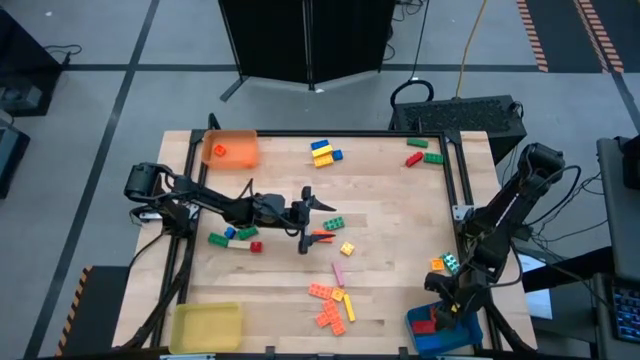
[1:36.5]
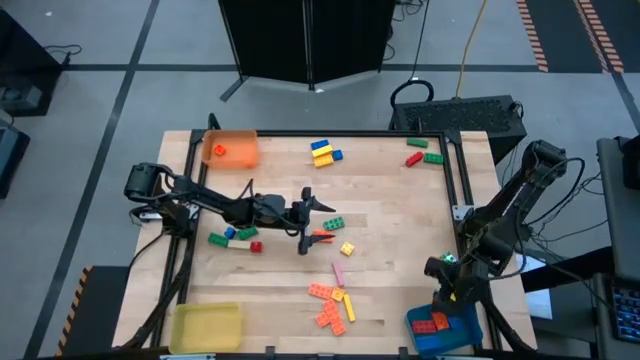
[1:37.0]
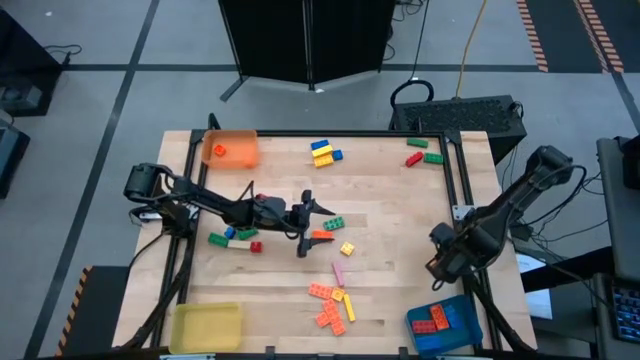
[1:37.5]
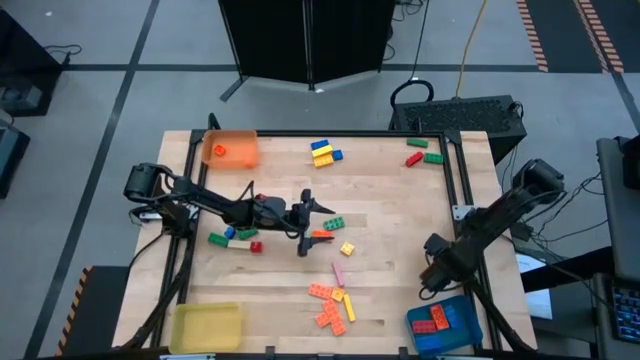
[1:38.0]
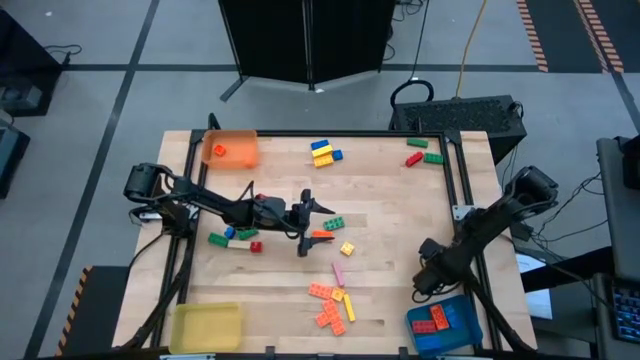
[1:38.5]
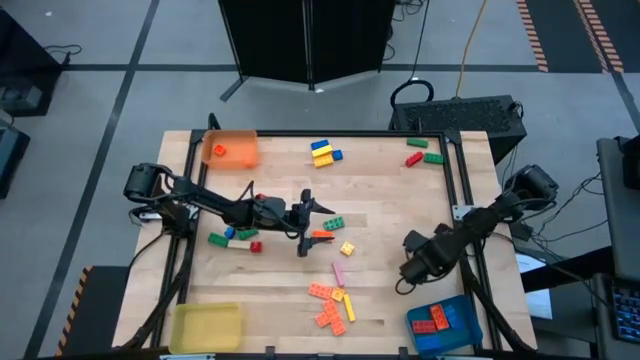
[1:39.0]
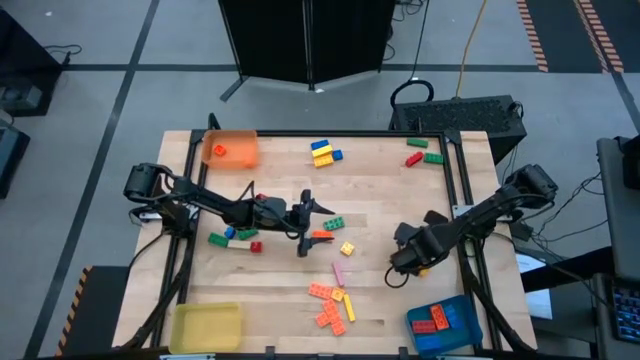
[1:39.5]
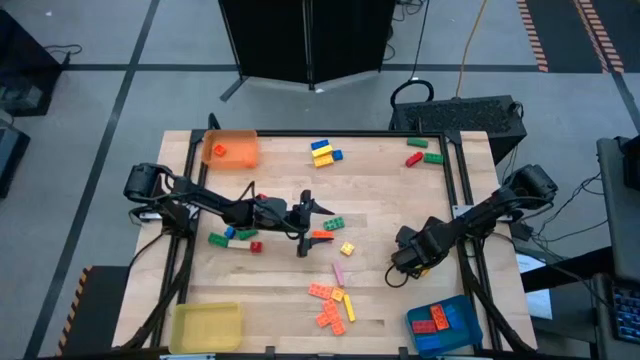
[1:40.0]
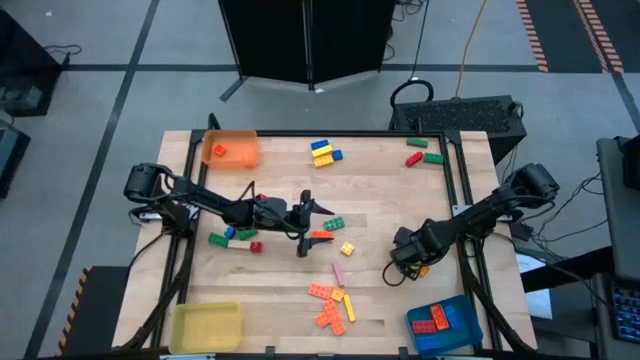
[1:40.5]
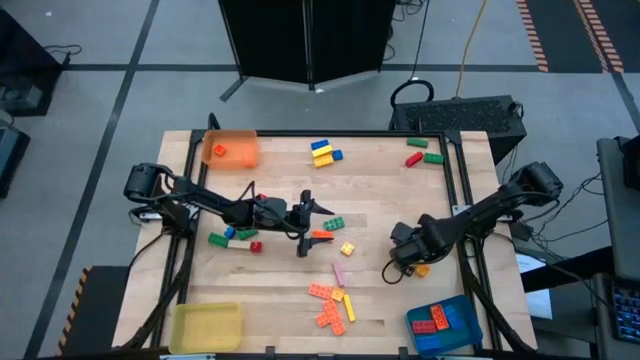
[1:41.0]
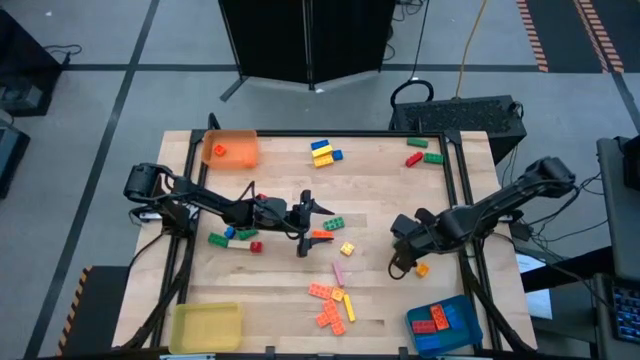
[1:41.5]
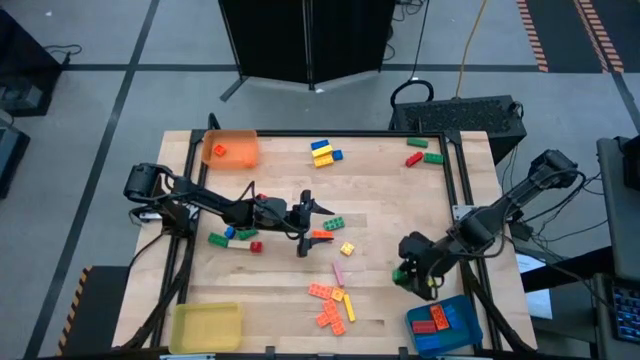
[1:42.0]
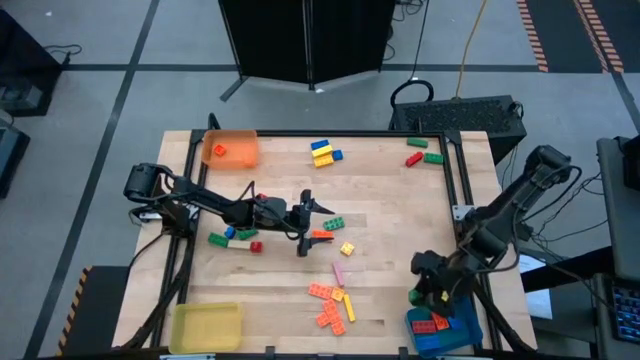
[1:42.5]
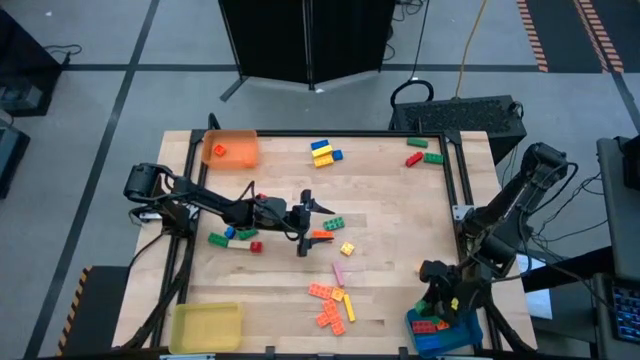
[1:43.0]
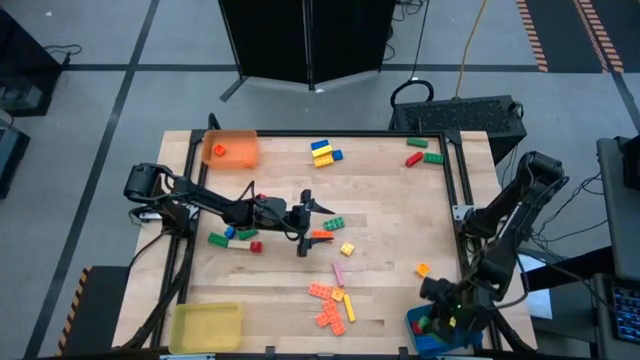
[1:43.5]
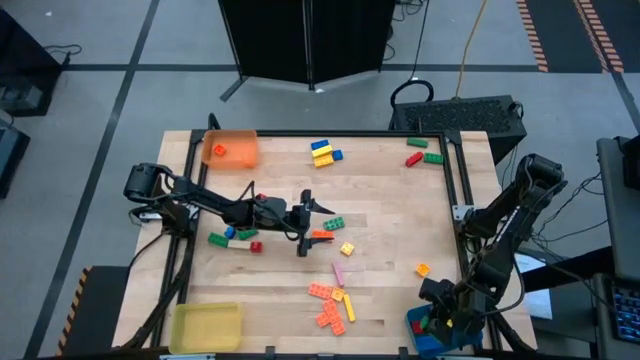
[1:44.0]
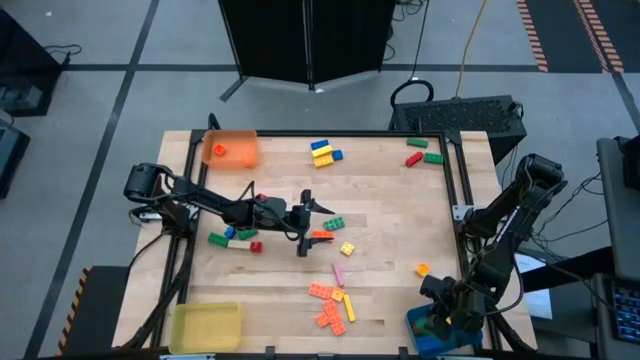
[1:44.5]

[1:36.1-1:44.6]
Task: Sort blocks by size
Put the green 8 stud game piece into the blue bin

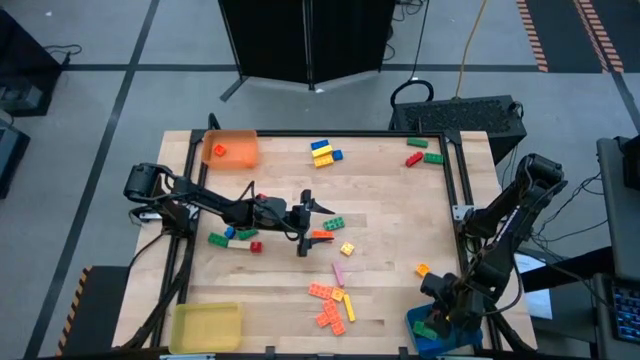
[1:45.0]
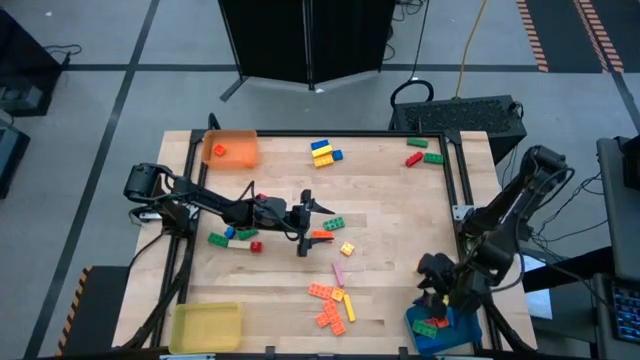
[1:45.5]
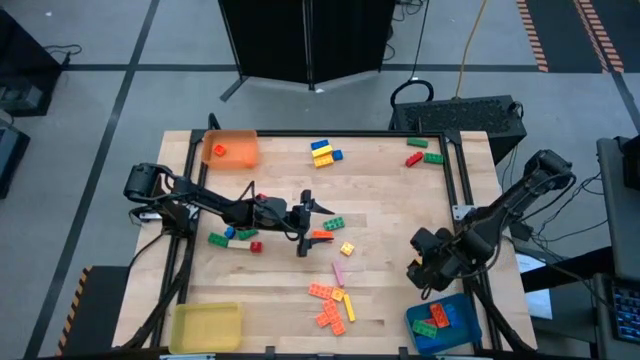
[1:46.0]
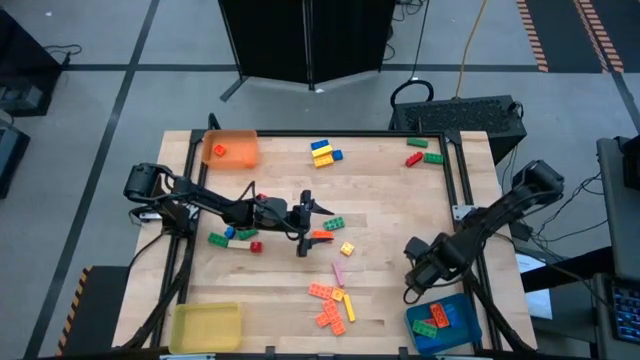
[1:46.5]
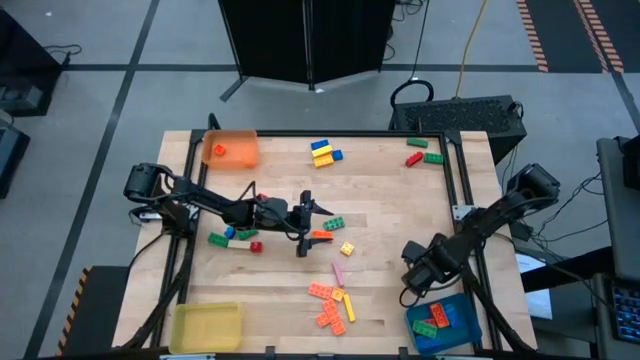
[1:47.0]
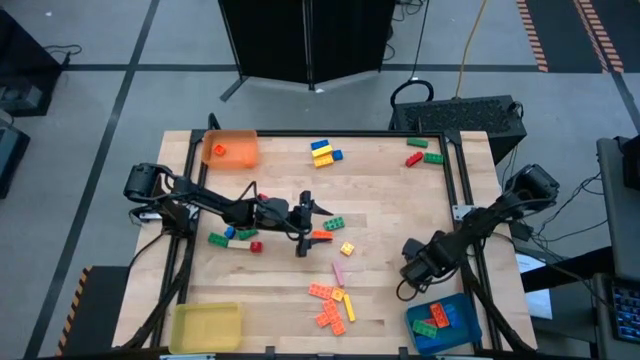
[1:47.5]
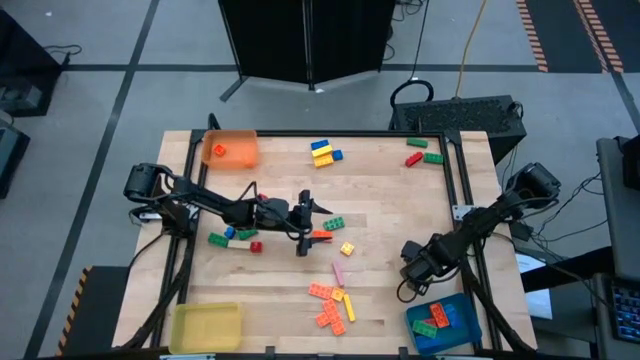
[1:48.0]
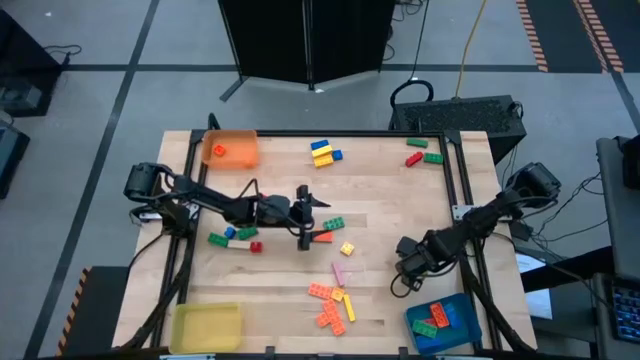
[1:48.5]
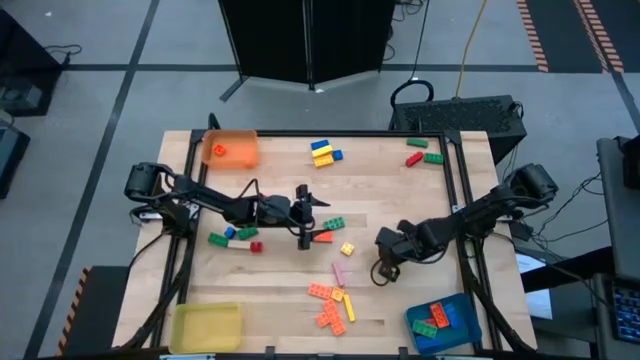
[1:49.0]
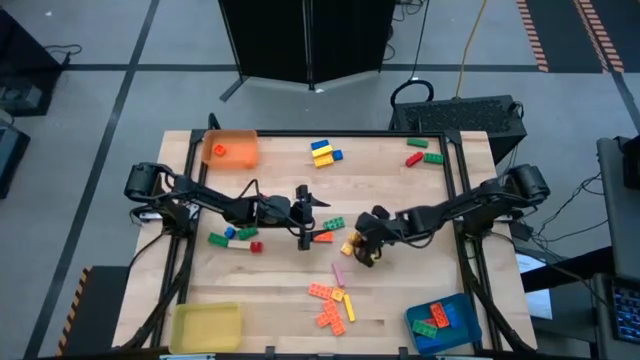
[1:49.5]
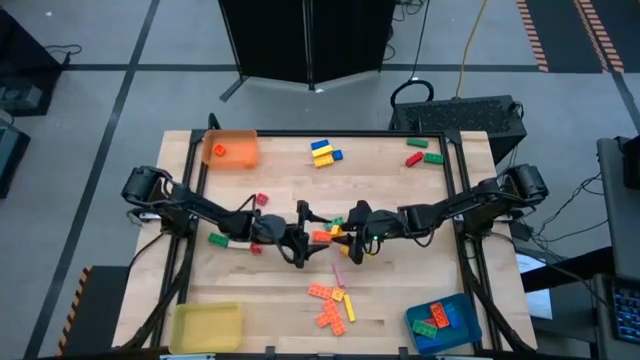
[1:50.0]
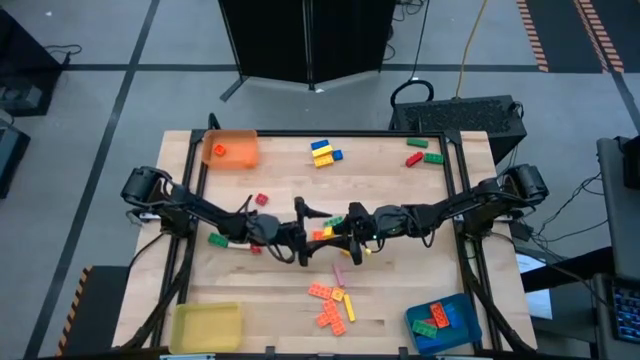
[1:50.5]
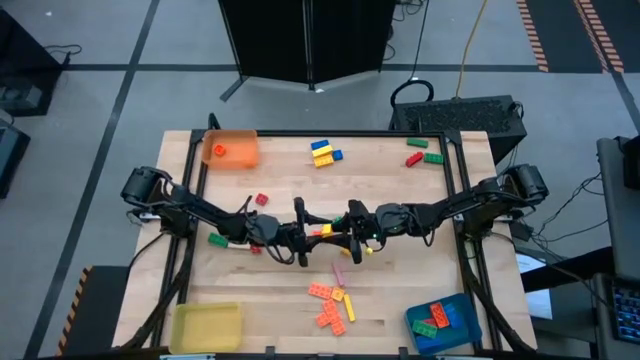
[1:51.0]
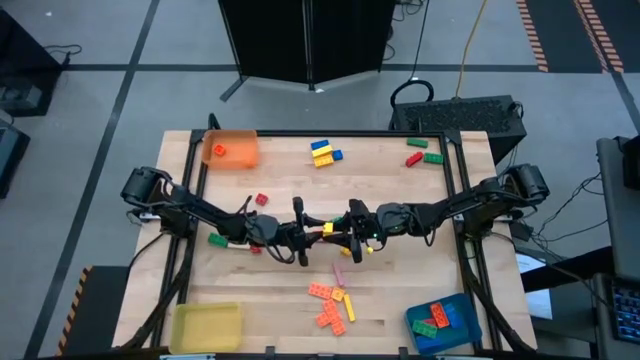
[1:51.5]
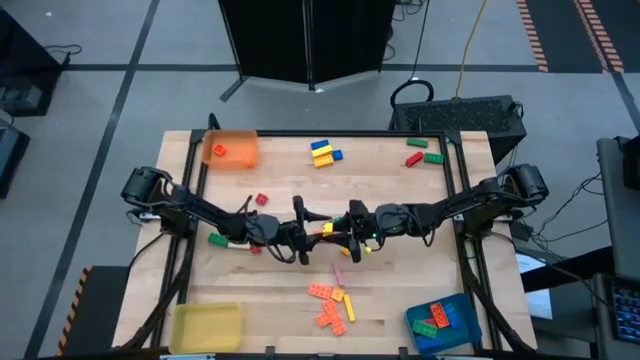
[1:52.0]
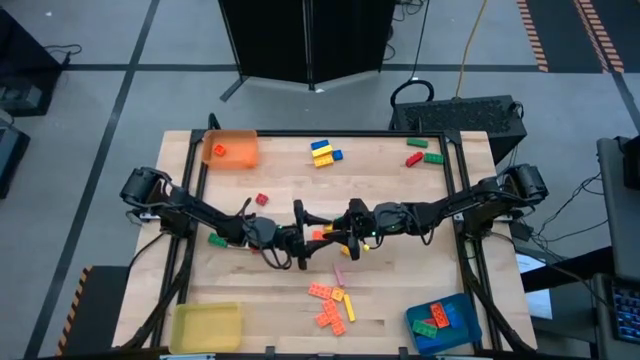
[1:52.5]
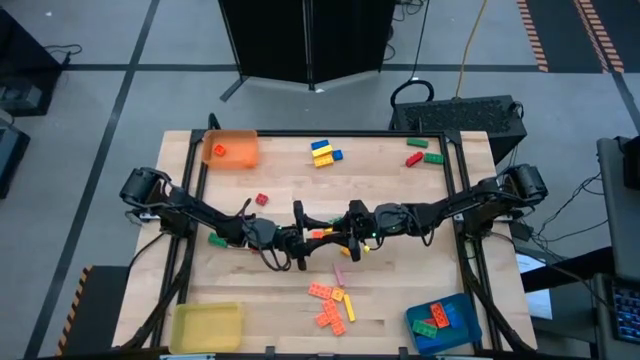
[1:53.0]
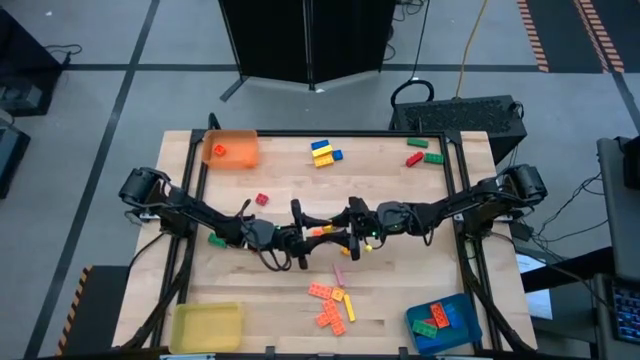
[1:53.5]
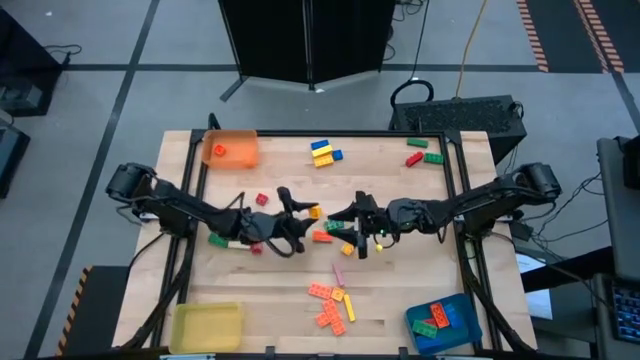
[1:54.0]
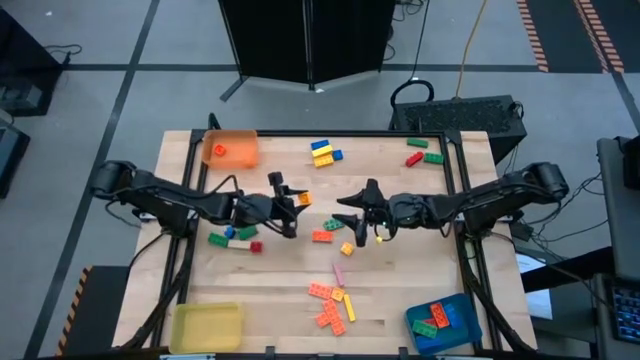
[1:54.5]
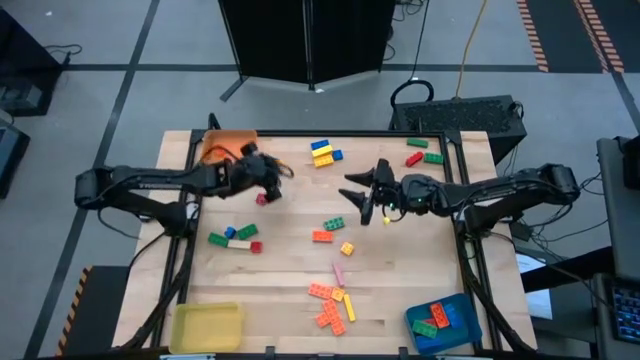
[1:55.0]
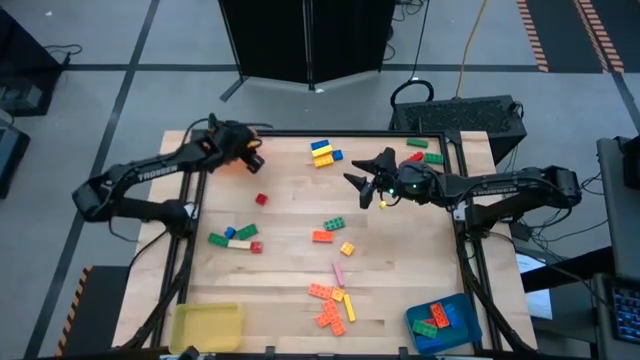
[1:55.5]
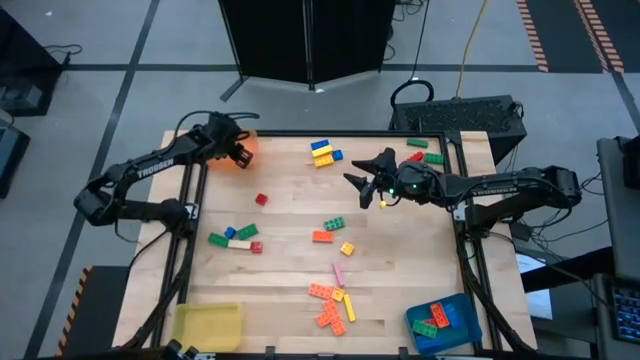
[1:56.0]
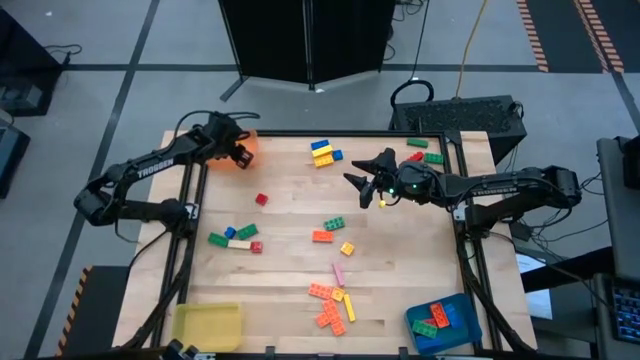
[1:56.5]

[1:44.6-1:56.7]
Put the yellow 4 stud game piece into the orange bin
